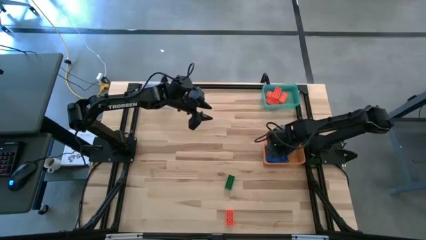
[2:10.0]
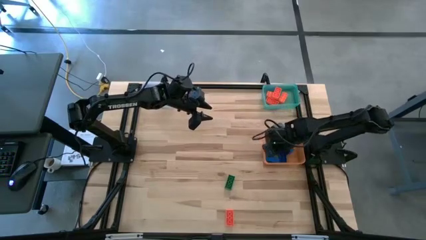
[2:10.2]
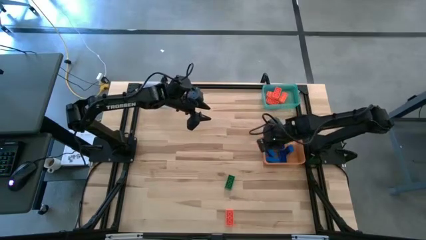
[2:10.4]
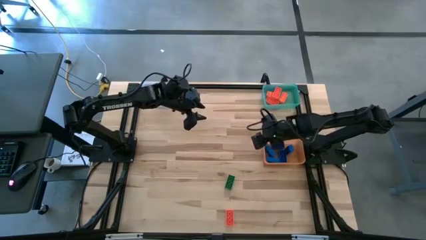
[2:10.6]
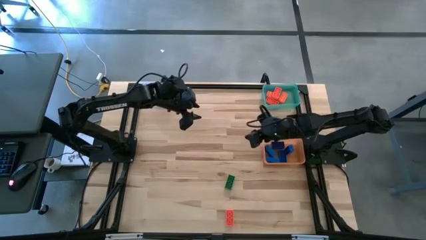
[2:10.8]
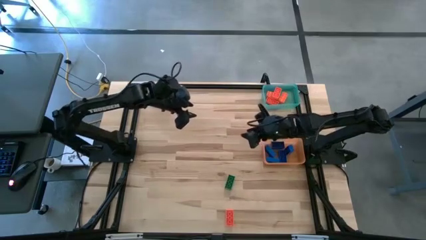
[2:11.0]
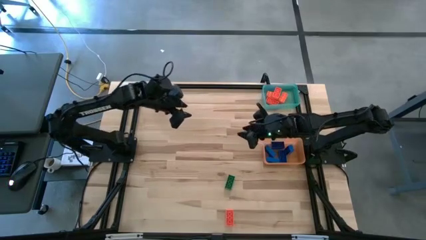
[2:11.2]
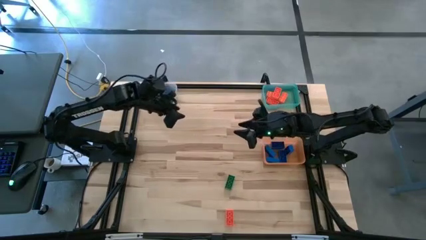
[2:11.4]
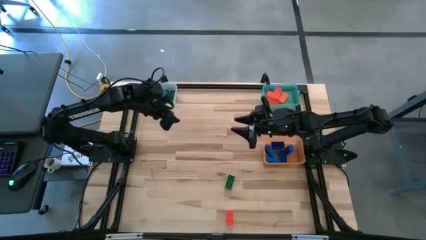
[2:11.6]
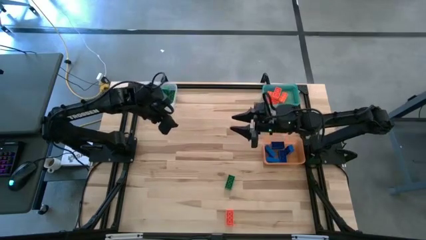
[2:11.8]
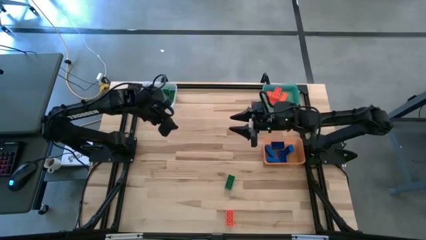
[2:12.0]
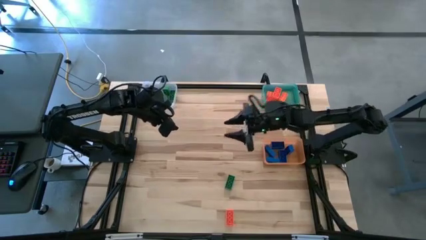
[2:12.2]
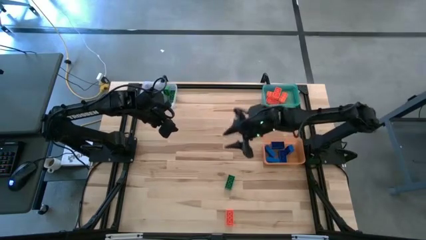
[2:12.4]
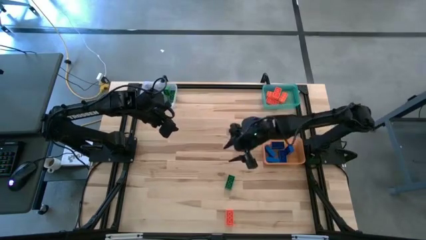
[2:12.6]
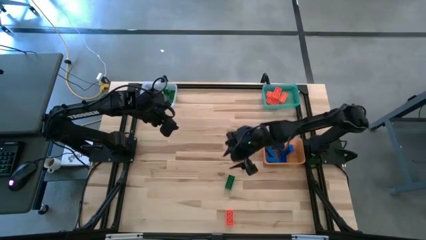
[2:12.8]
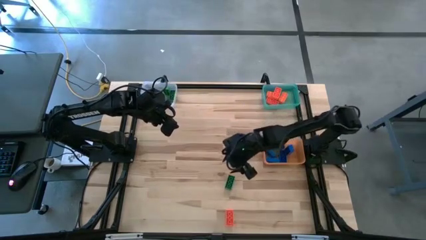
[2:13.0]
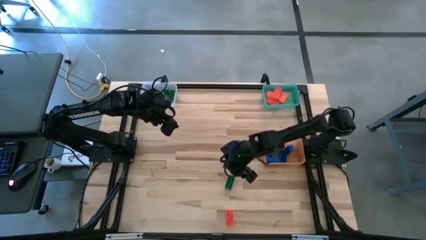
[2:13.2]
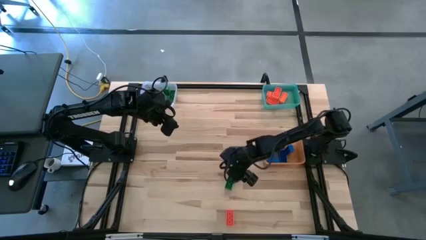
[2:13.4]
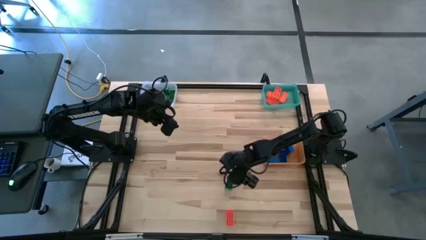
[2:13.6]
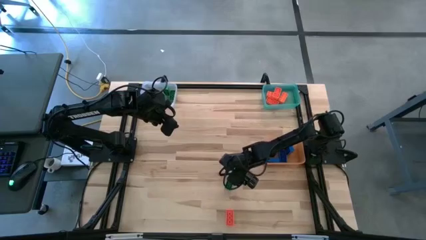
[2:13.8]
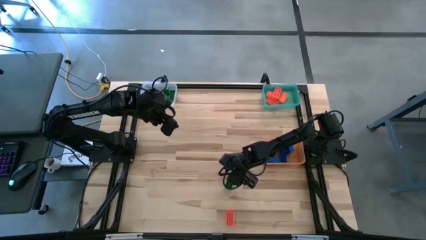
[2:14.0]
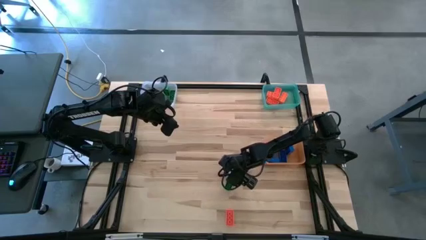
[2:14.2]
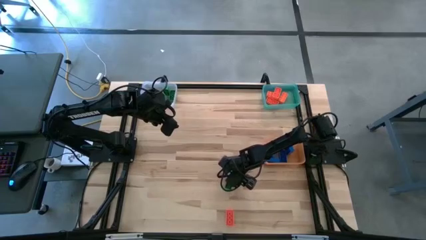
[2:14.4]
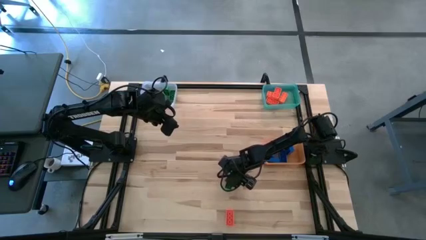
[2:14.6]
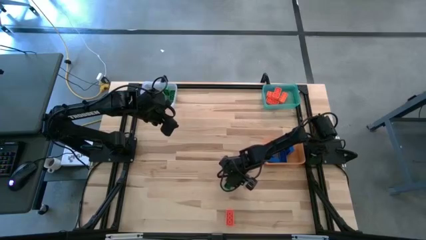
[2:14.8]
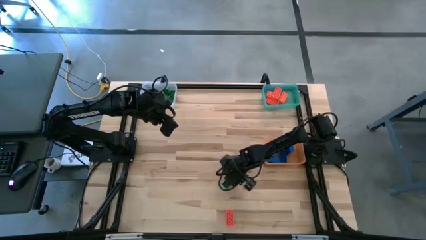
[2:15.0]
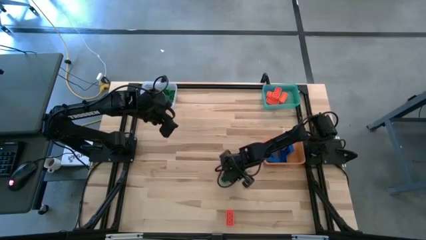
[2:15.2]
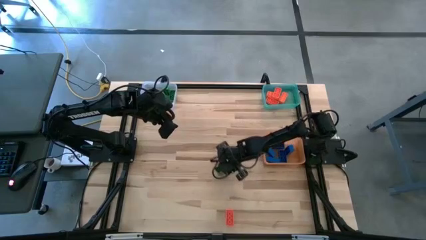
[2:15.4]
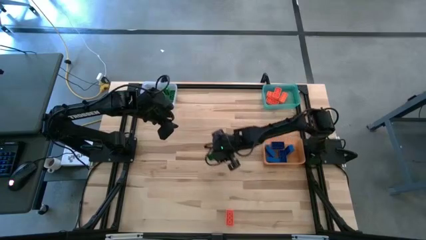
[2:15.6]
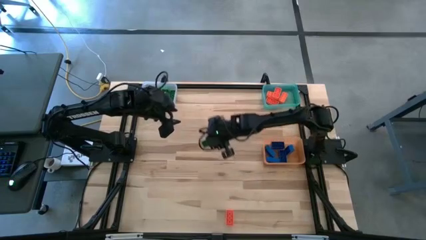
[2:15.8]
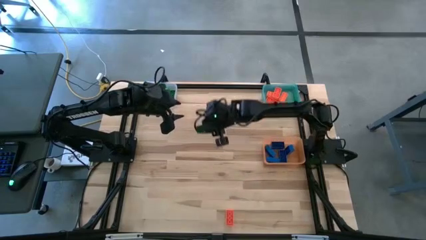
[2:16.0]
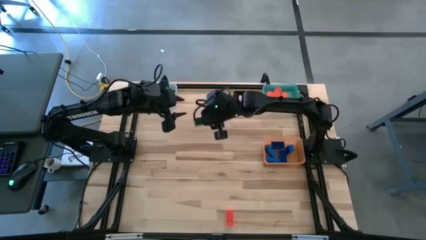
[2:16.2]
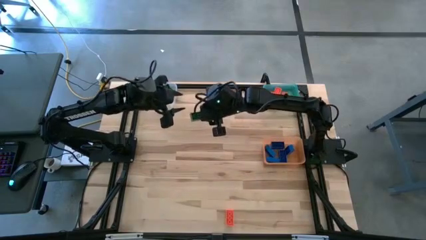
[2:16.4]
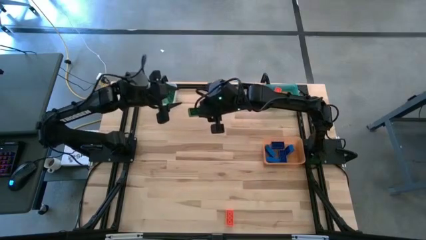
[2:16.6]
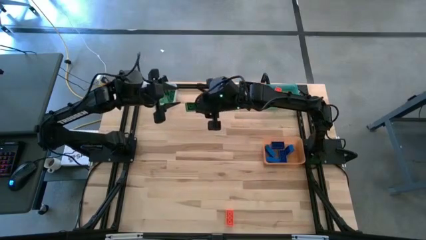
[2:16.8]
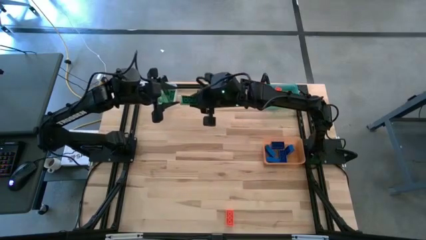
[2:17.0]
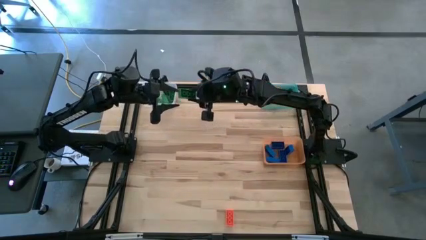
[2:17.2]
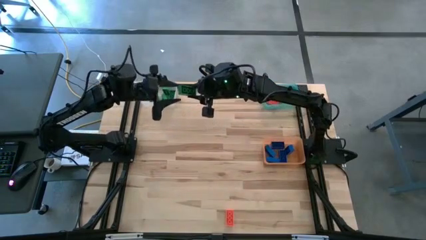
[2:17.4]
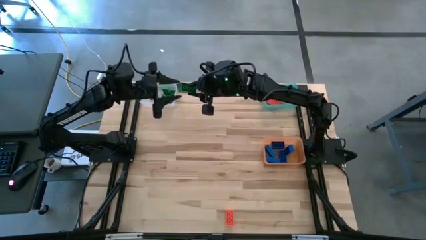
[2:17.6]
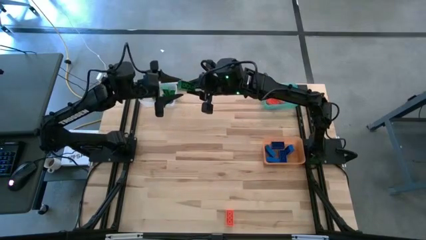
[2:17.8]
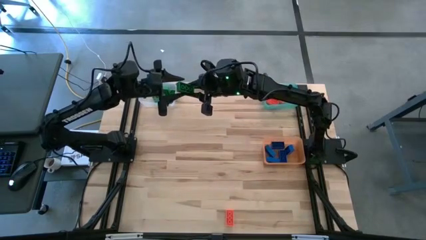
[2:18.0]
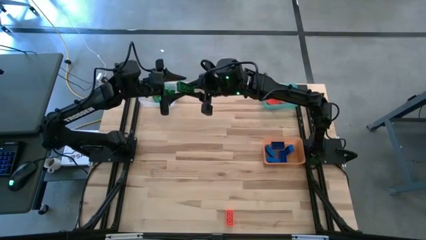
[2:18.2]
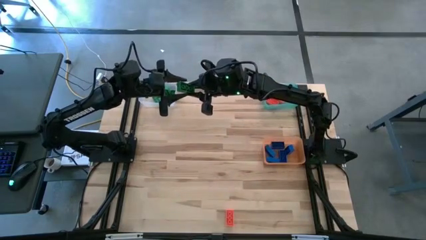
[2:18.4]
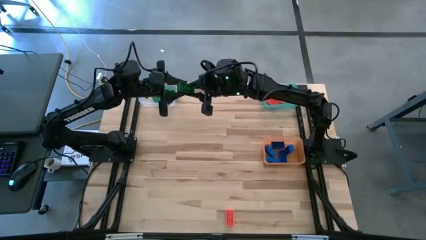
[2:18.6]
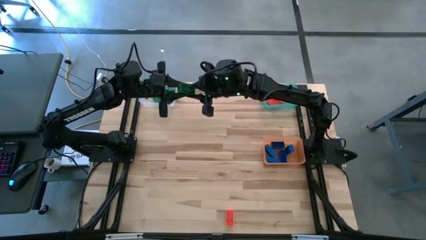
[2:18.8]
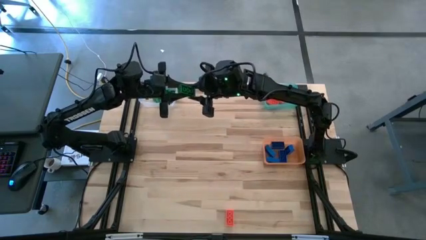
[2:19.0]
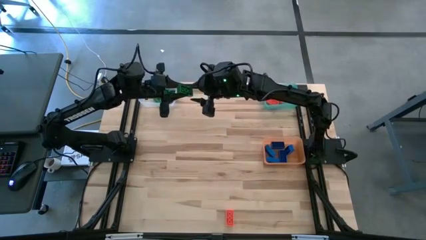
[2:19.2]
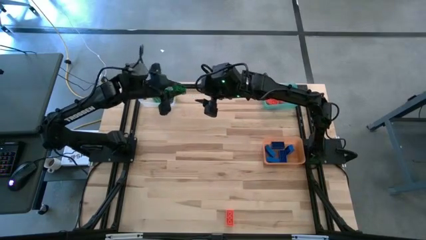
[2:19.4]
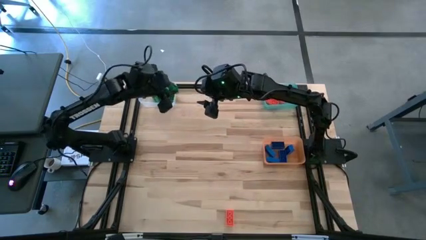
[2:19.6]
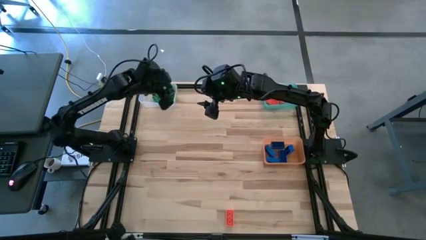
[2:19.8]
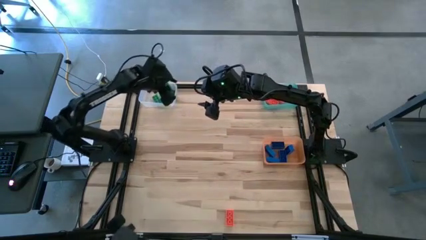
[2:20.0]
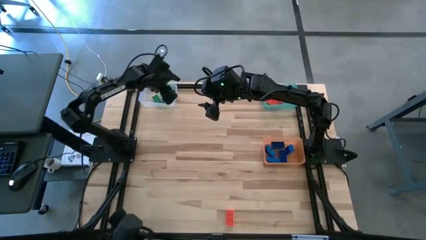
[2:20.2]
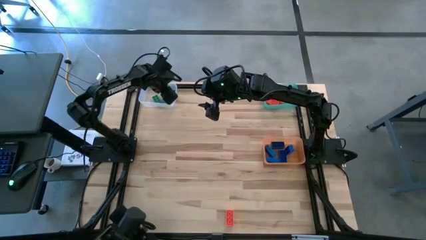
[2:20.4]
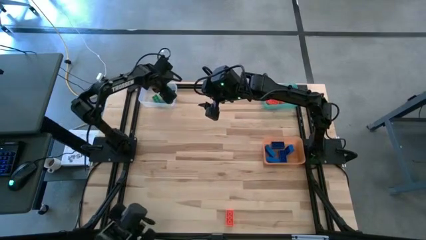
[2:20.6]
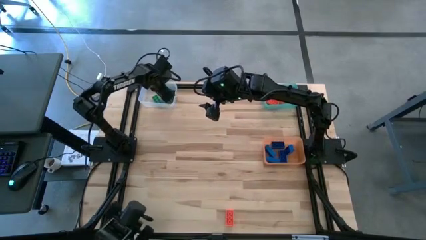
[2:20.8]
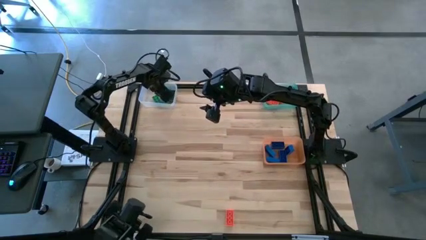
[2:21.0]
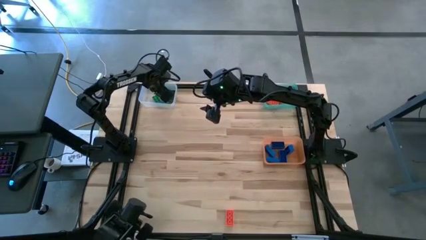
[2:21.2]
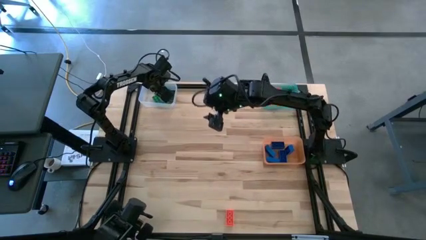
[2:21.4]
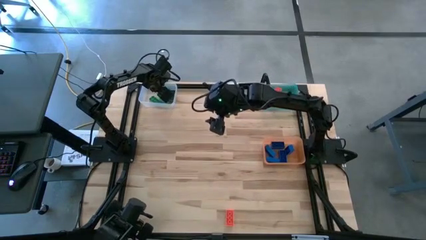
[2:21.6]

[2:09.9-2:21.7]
Task: Sort & place blocks by color
Put the green game piece into the transparent bin
